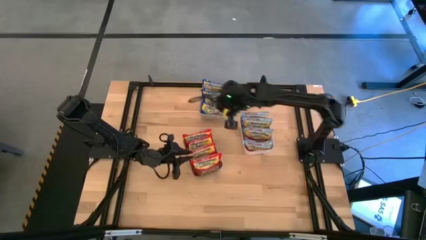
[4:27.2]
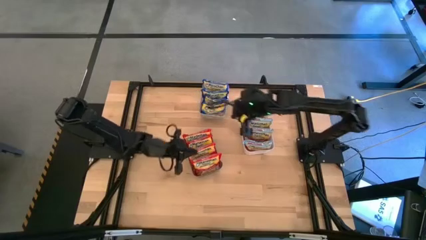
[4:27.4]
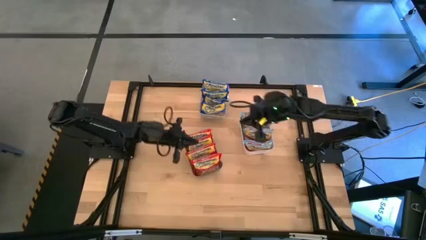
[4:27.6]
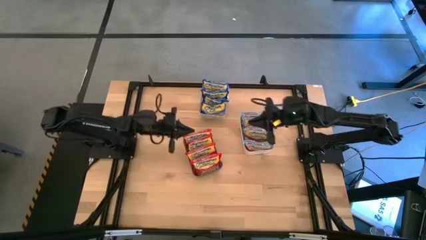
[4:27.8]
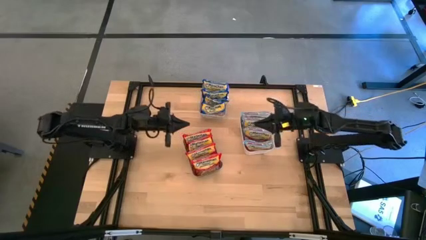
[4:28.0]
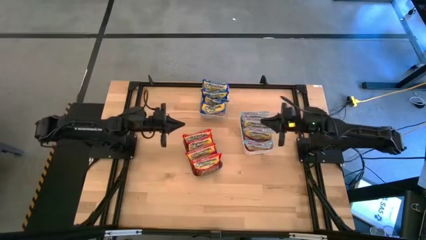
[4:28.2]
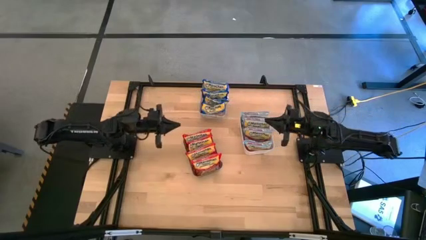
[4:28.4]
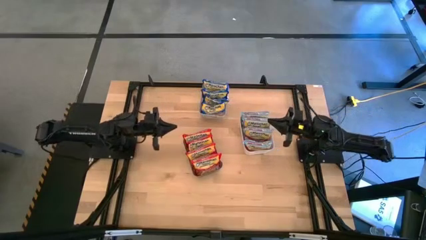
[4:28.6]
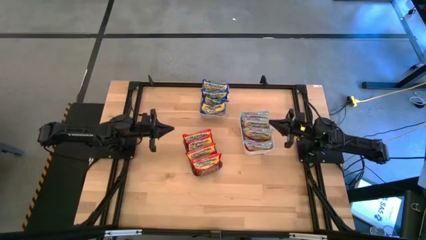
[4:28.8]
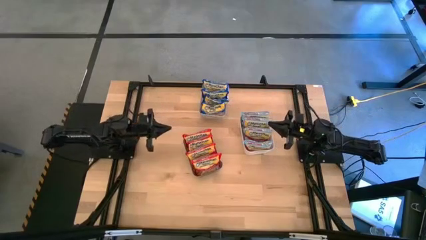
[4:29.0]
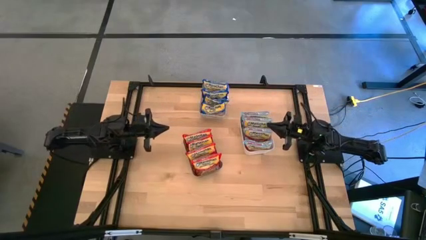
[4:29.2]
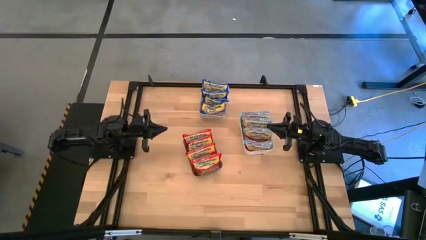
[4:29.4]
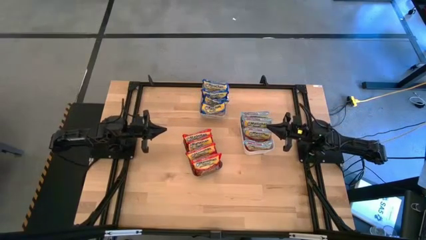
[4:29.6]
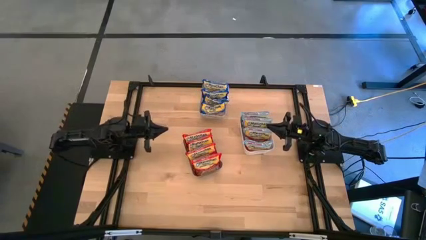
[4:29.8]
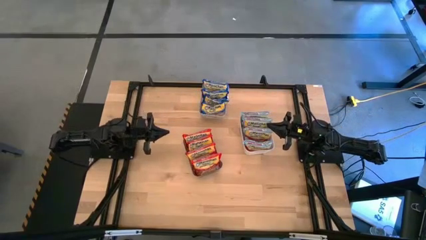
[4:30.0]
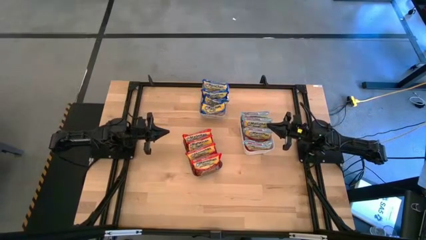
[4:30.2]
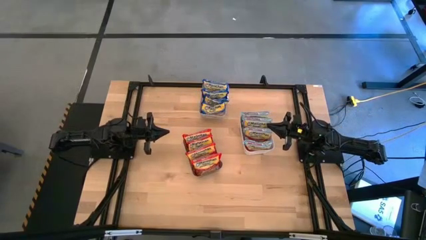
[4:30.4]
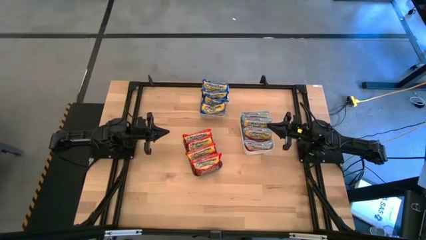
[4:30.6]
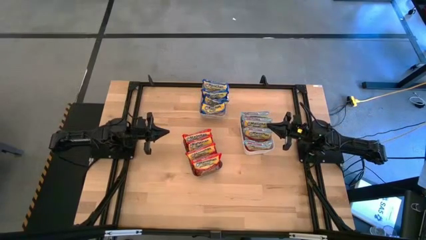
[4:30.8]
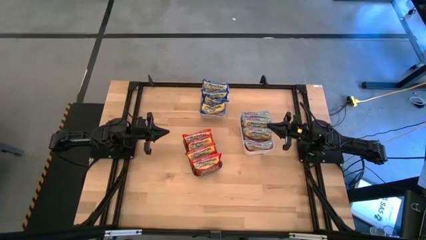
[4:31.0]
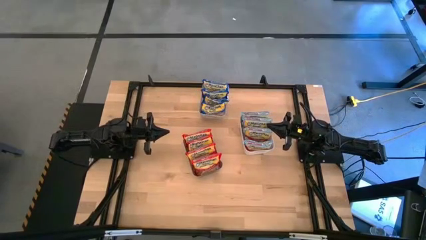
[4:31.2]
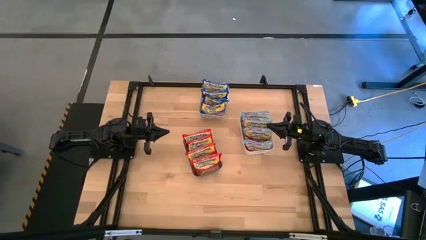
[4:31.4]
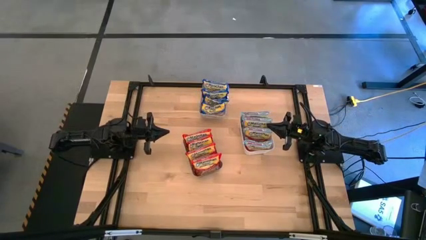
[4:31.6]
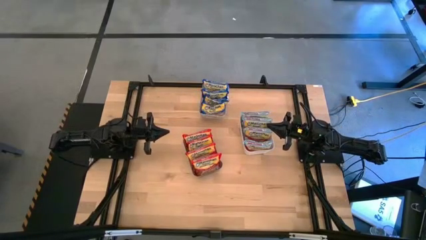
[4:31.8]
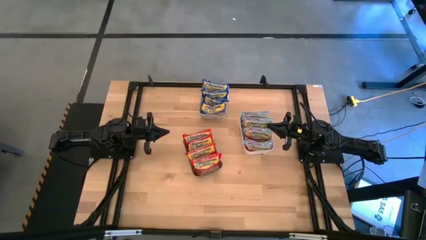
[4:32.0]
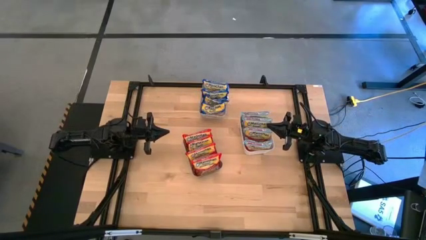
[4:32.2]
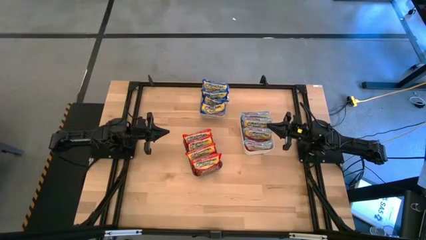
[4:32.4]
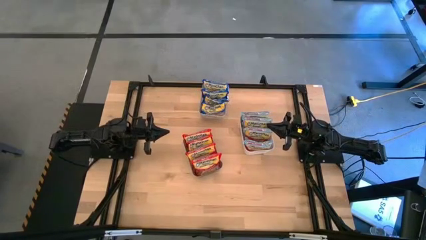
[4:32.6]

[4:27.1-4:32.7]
Task: Sort Maruchan noodles
Return to Home Position

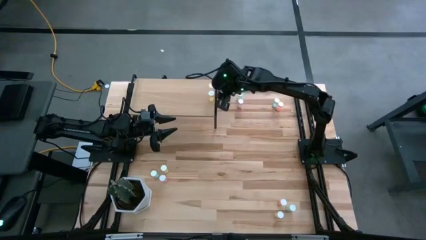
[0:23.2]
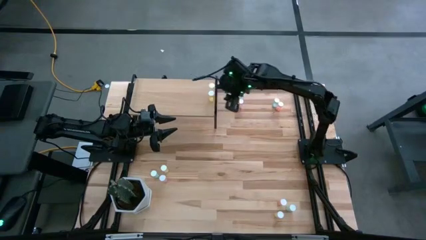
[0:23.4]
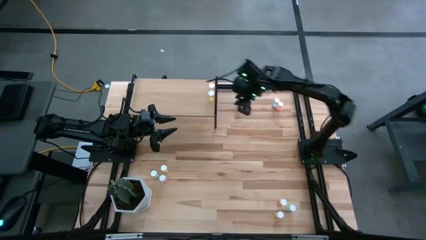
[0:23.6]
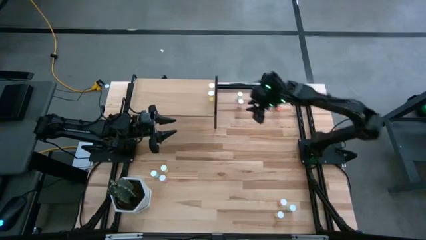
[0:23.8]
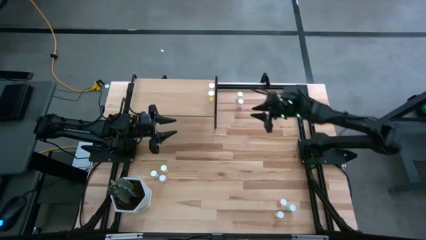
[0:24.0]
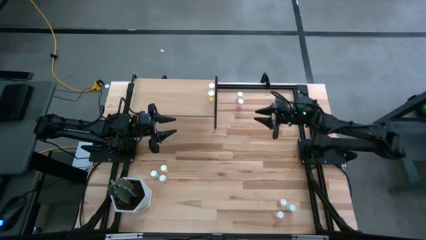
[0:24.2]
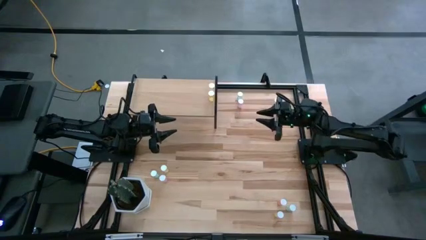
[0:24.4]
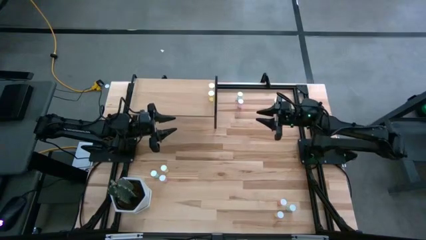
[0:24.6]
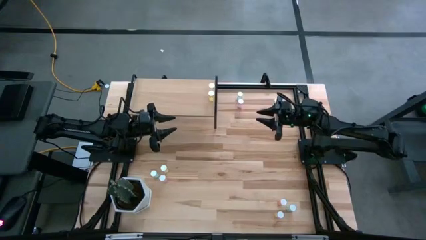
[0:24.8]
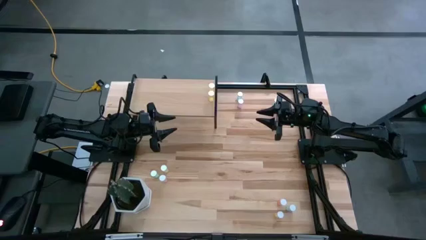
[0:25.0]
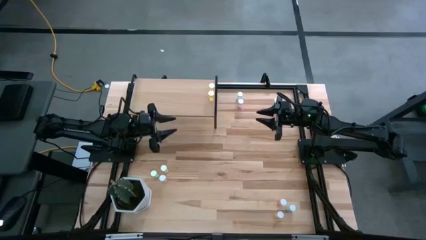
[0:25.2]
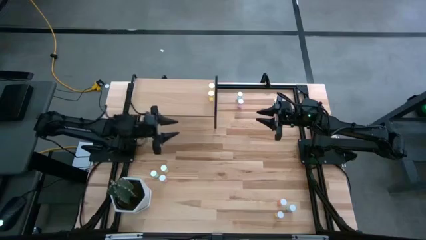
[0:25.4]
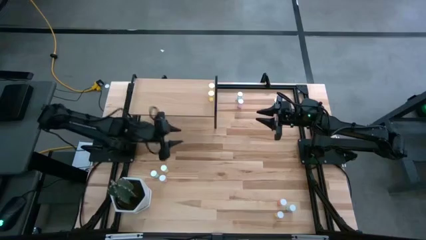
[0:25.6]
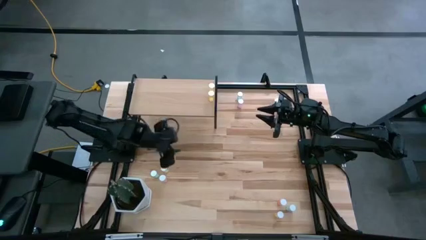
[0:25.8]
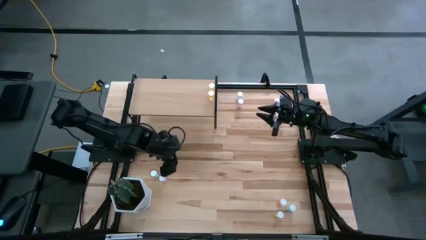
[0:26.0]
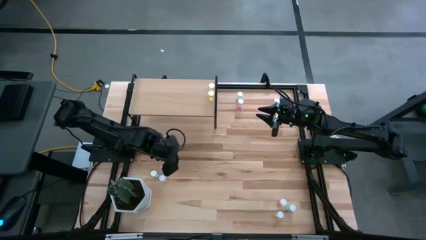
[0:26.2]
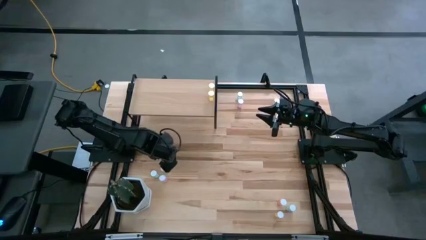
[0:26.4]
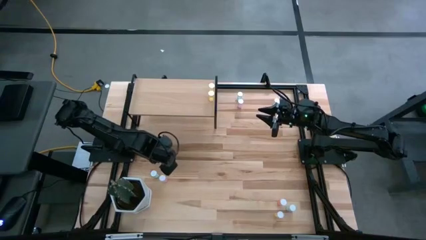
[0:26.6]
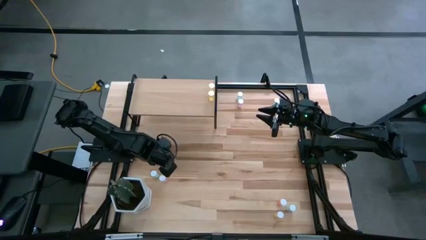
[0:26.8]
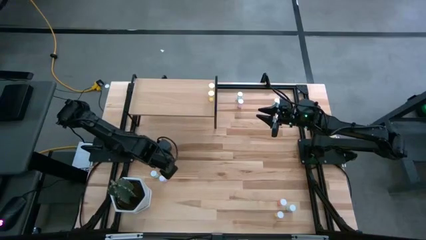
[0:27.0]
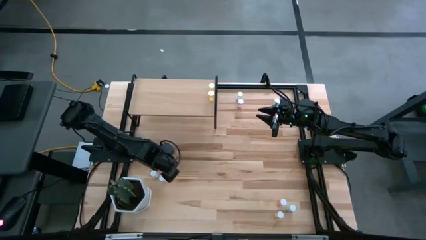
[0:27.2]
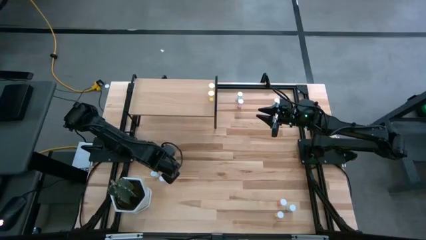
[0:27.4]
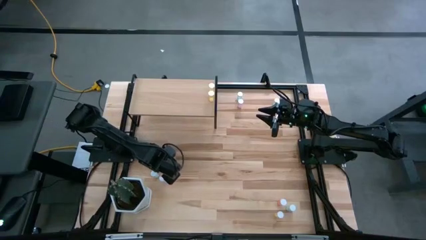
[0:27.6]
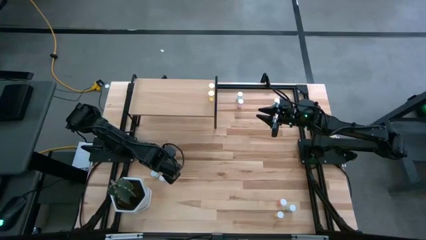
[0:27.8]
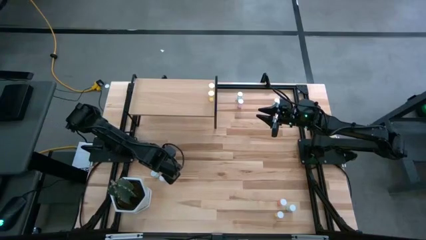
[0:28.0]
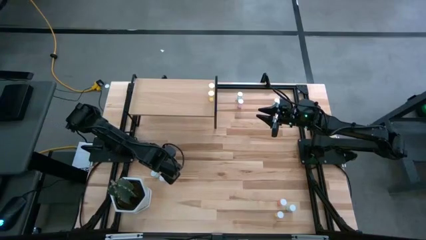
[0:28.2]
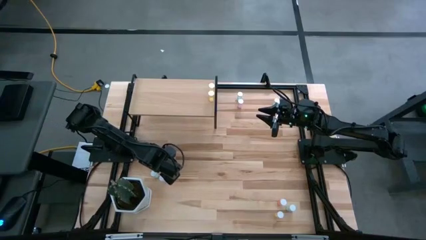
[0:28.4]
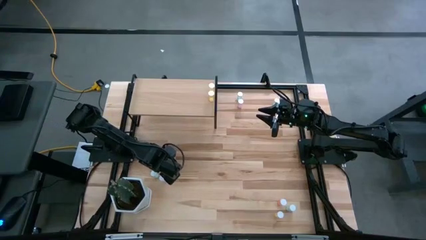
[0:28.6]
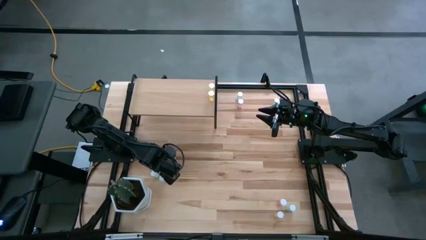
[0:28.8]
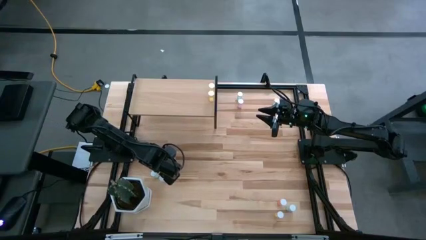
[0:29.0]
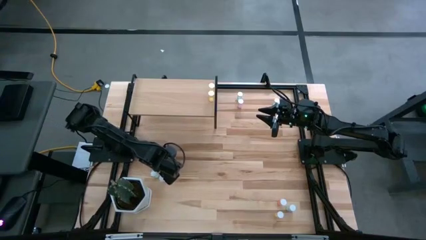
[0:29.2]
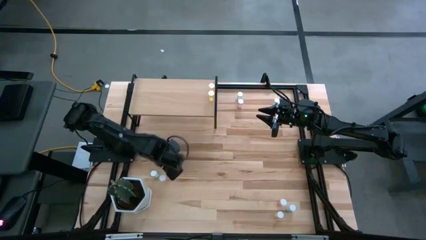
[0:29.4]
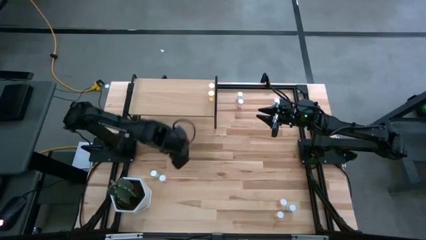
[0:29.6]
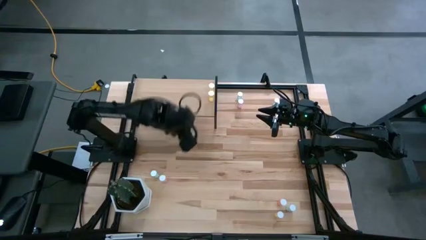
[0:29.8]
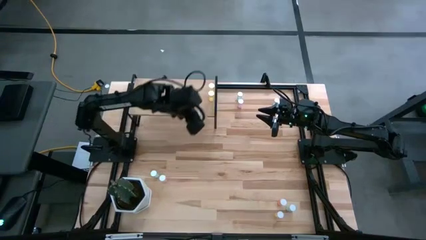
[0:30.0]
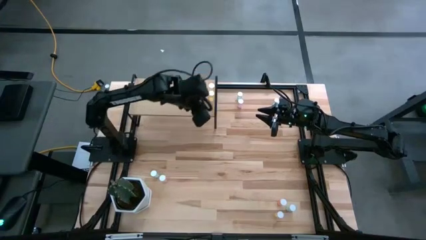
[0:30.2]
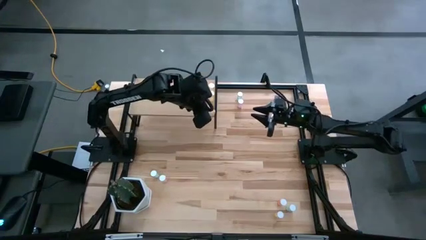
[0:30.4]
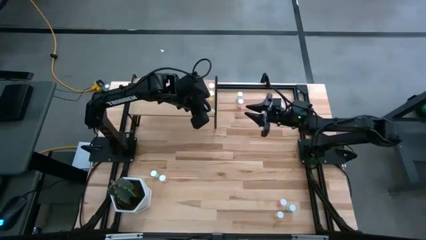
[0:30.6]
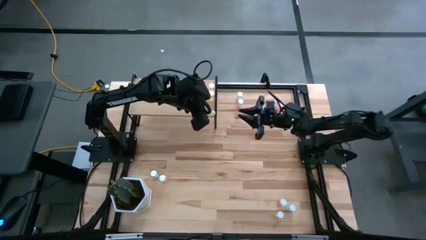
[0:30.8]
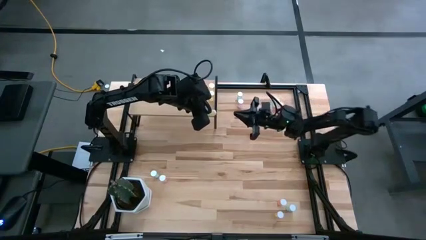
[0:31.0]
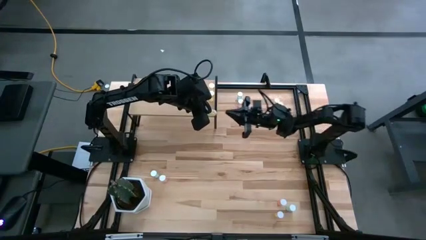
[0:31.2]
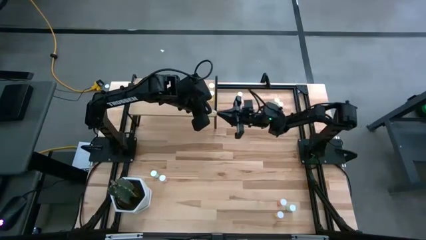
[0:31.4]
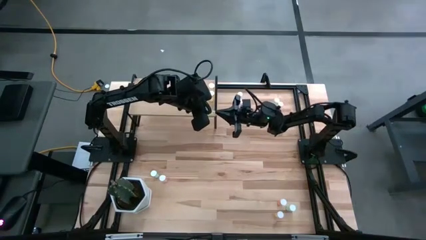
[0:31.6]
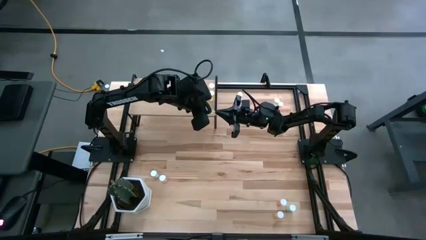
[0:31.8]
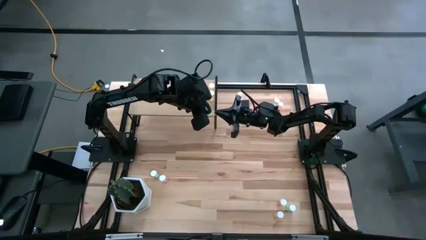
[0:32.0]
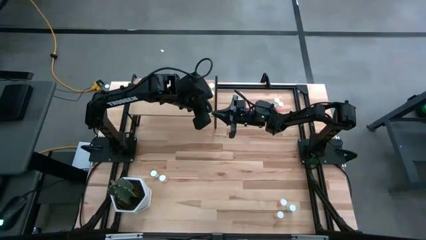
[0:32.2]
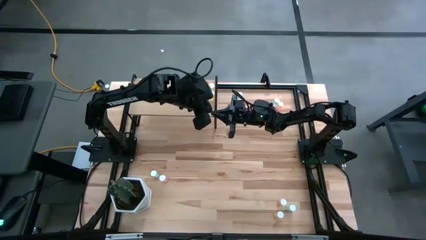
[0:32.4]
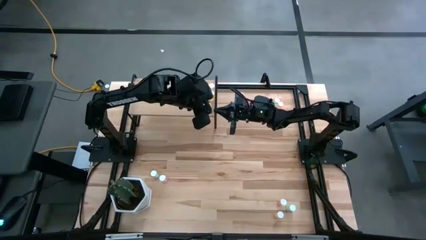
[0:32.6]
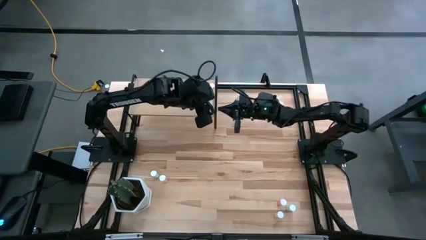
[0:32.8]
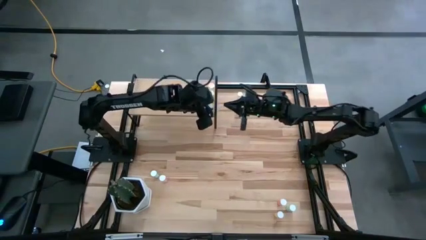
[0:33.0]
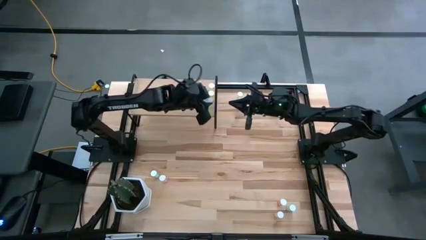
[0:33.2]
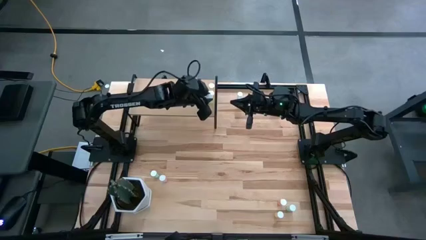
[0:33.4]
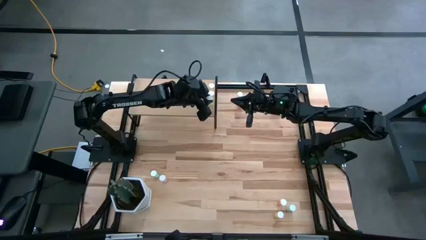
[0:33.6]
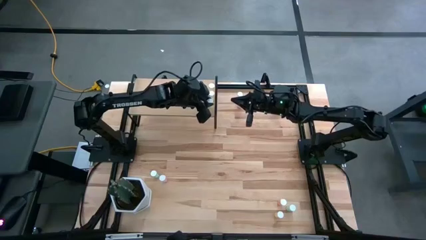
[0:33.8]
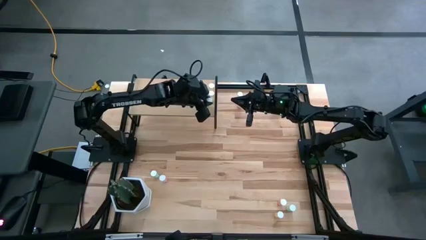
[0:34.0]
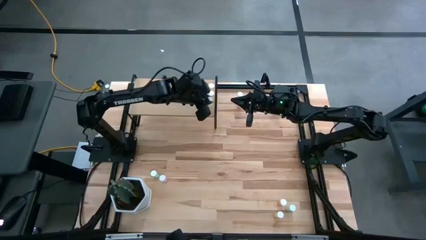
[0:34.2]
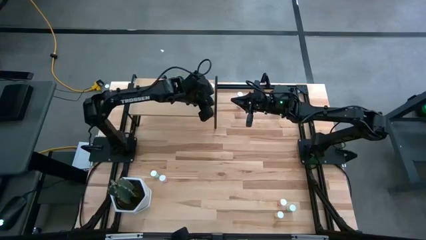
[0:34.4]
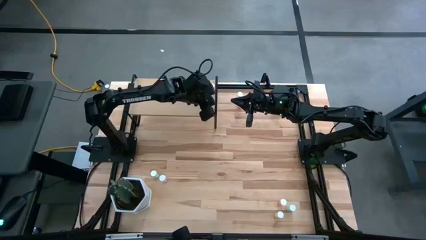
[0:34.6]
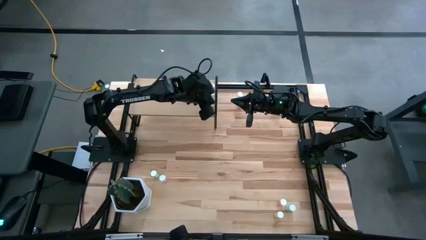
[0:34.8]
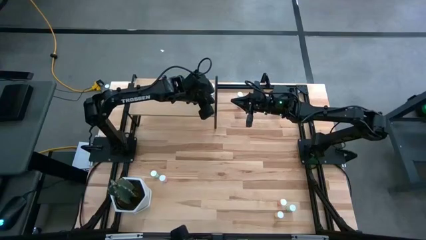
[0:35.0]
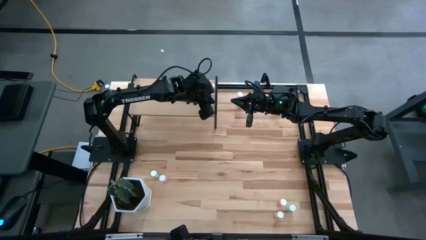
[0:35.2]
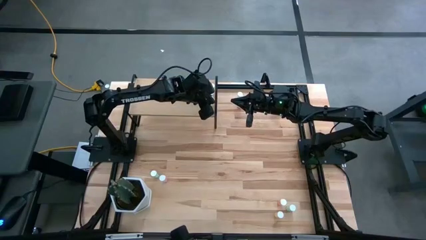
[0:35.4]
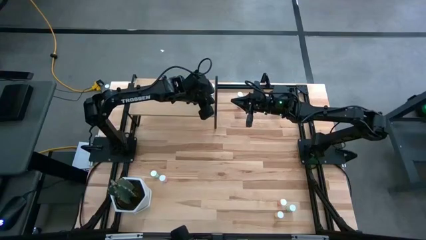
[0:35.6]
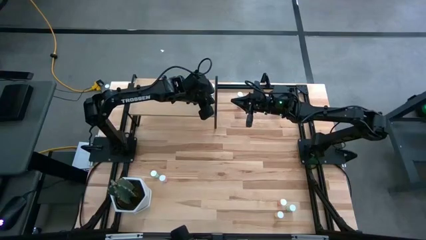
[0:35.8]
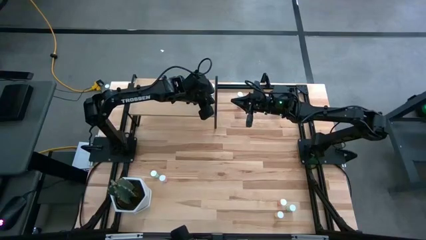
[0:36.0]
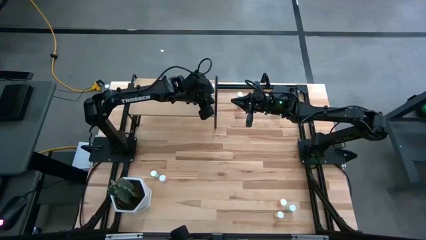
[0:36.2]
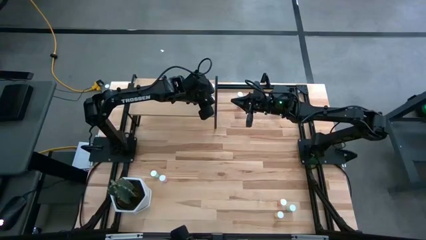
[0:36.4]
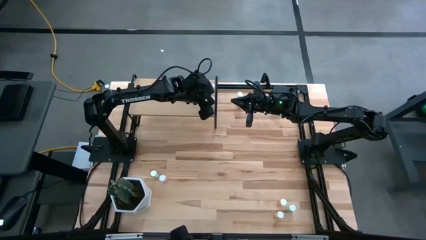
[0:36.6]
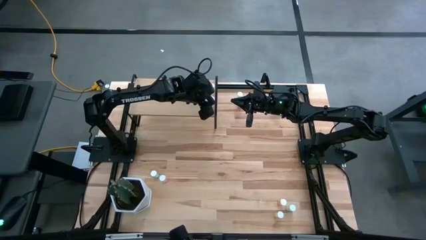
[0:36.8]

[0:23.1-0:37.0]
Task: Pick and place medicine bottles onto shelf by color
Put the left yellow pill bottle on the shelf
